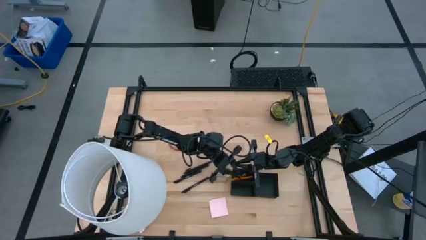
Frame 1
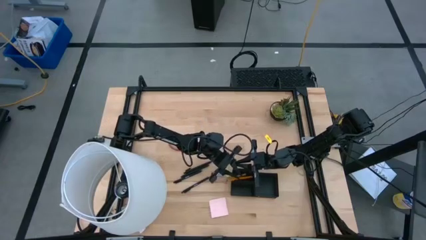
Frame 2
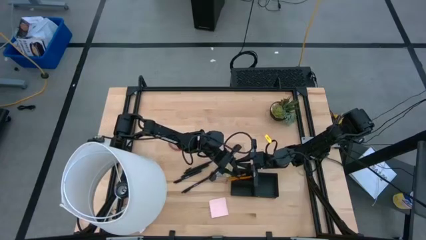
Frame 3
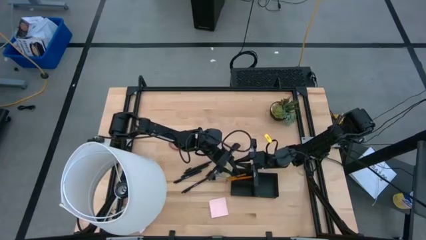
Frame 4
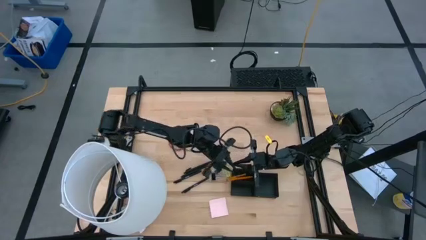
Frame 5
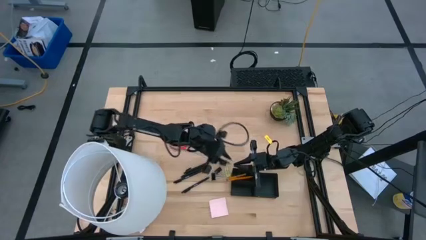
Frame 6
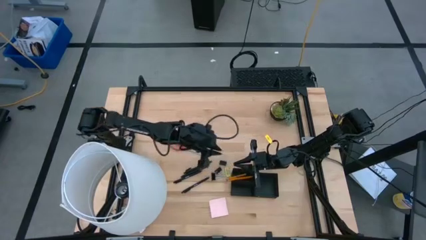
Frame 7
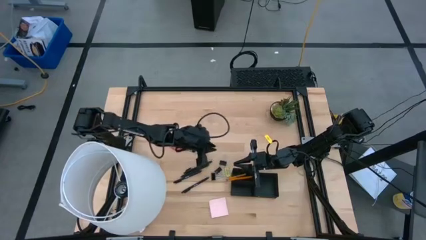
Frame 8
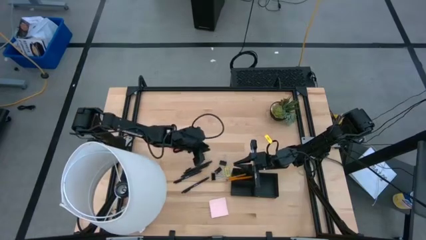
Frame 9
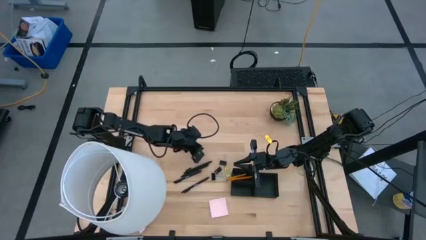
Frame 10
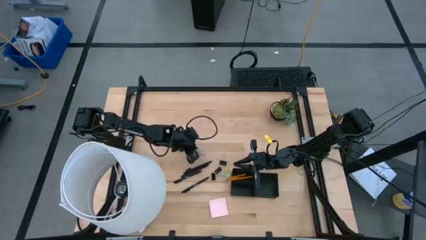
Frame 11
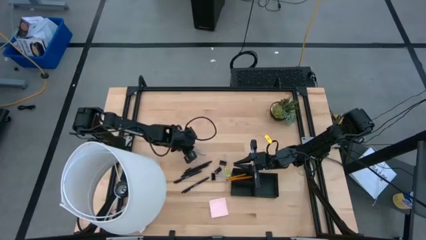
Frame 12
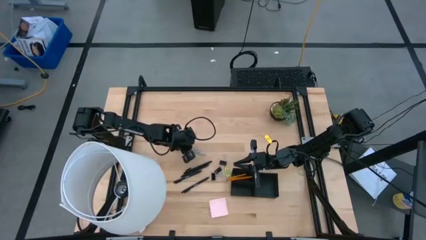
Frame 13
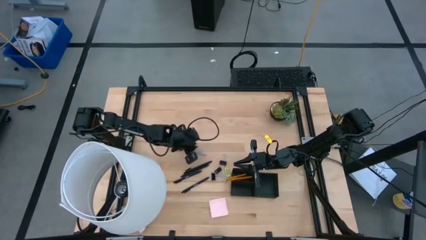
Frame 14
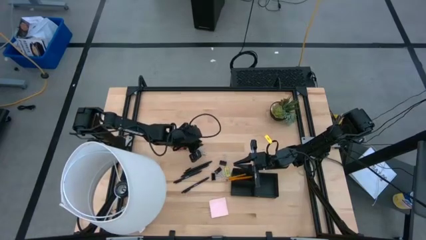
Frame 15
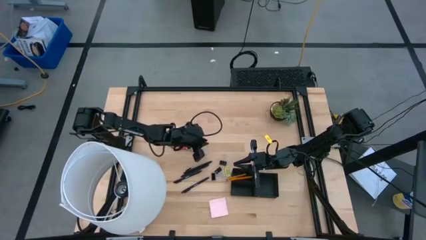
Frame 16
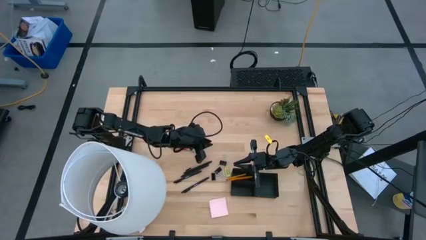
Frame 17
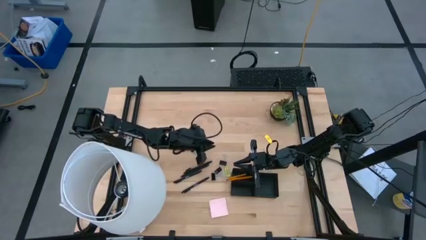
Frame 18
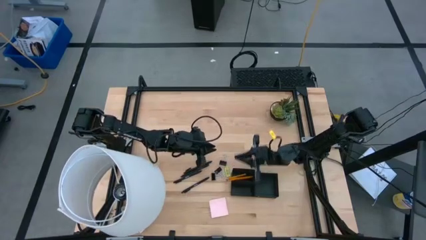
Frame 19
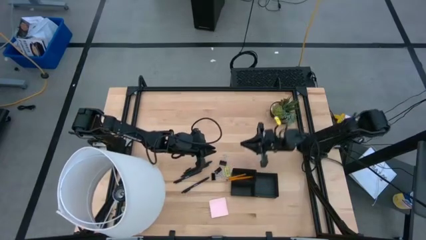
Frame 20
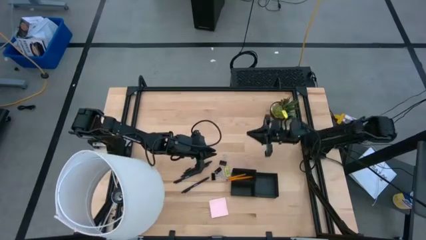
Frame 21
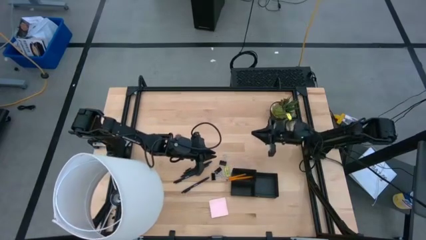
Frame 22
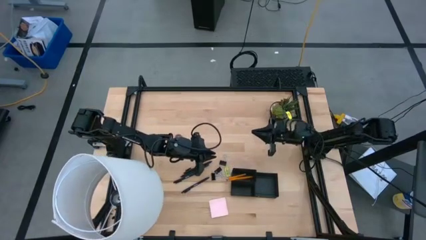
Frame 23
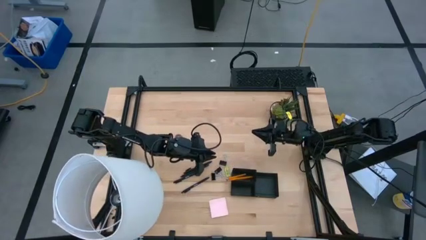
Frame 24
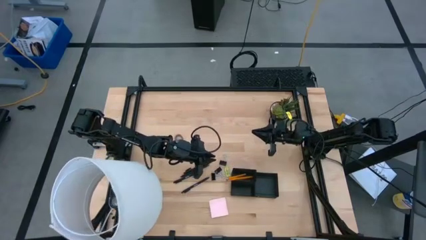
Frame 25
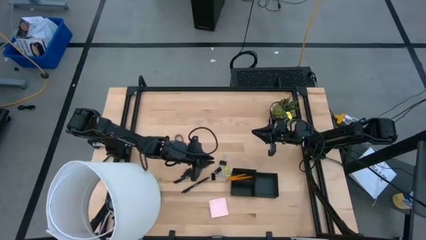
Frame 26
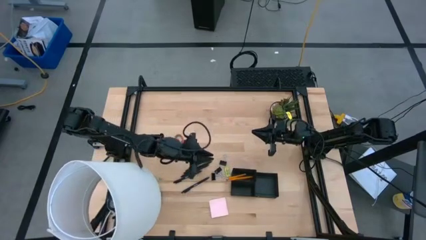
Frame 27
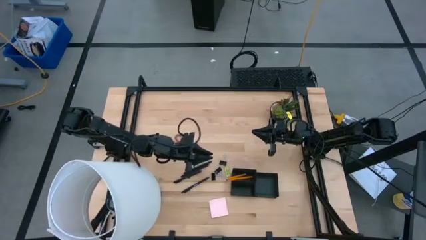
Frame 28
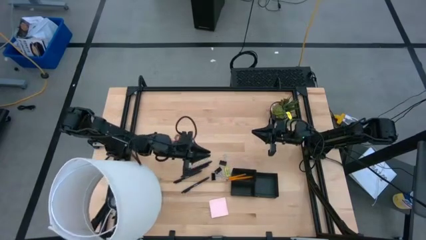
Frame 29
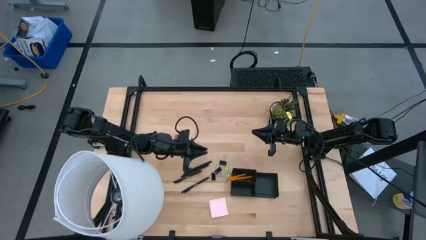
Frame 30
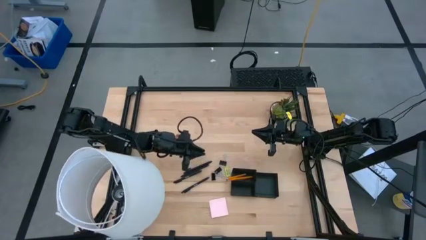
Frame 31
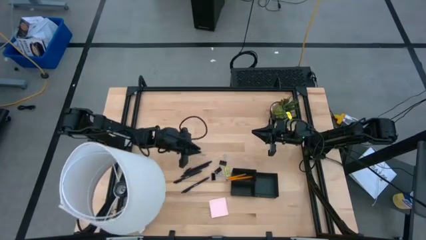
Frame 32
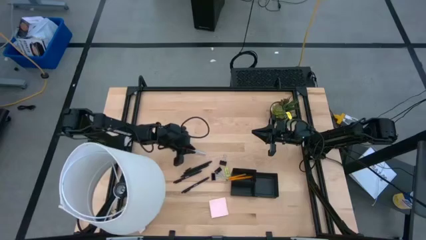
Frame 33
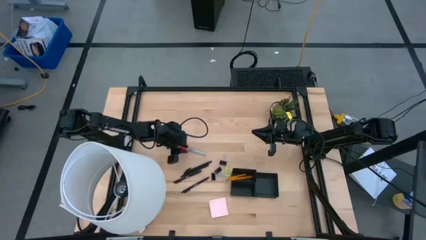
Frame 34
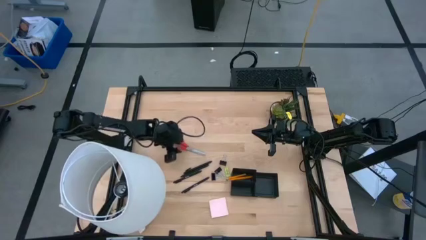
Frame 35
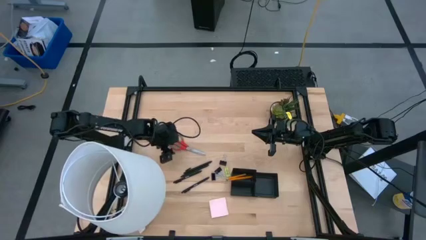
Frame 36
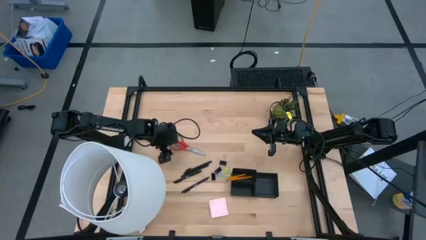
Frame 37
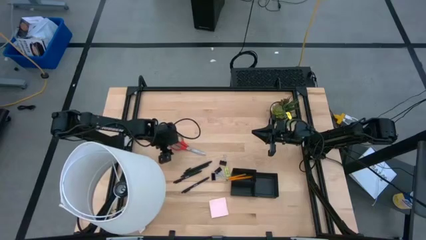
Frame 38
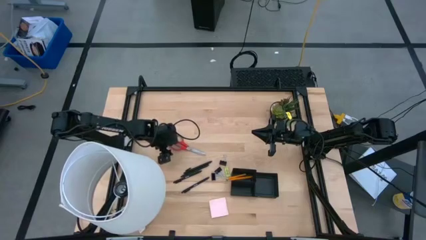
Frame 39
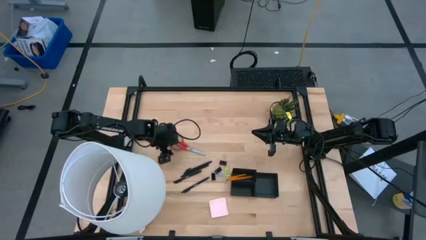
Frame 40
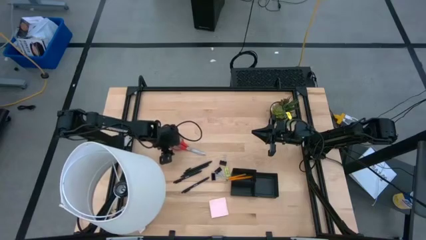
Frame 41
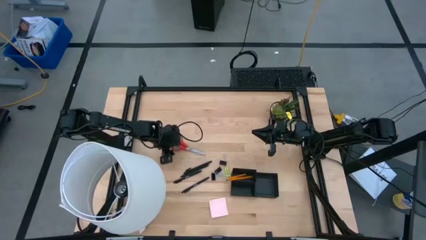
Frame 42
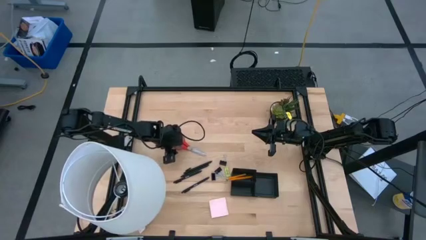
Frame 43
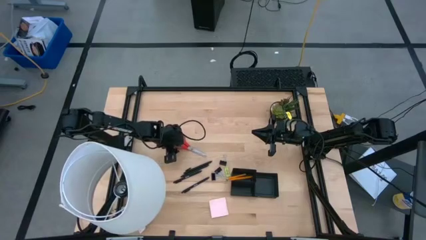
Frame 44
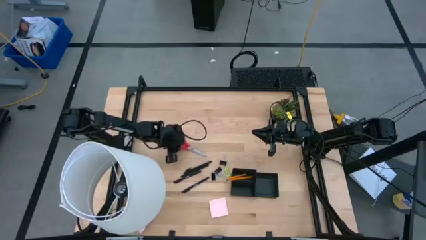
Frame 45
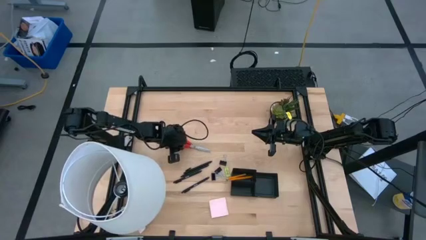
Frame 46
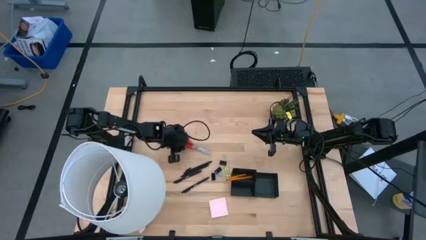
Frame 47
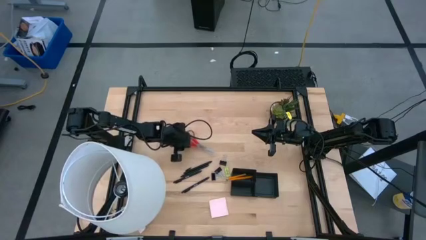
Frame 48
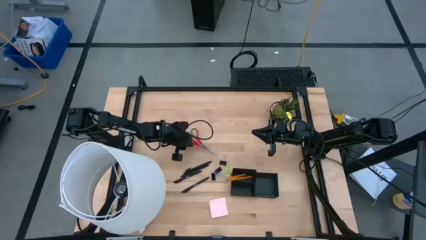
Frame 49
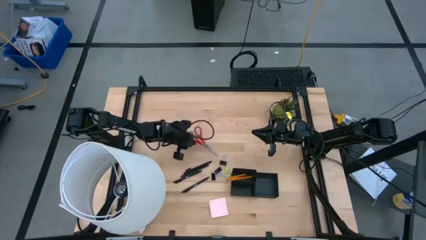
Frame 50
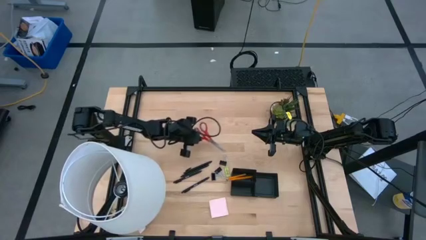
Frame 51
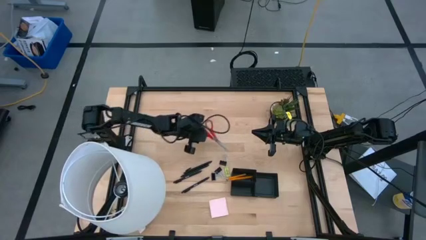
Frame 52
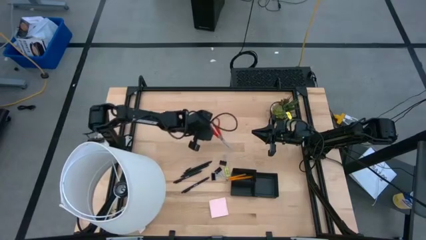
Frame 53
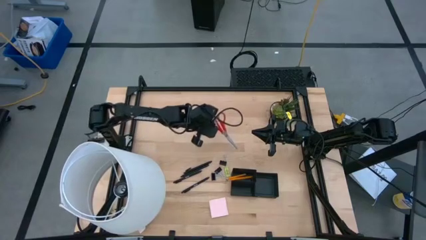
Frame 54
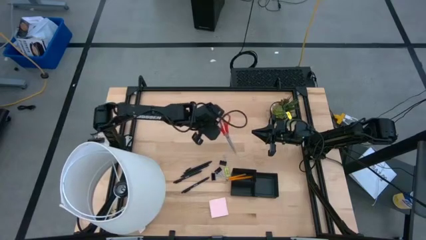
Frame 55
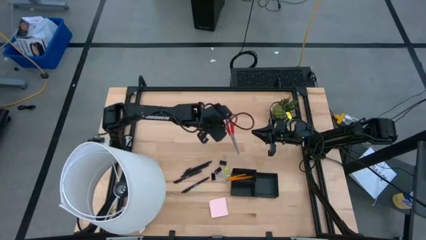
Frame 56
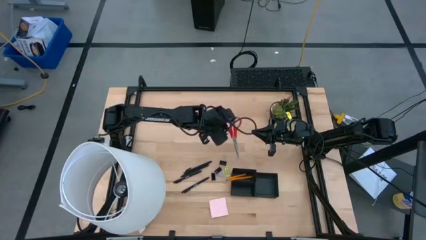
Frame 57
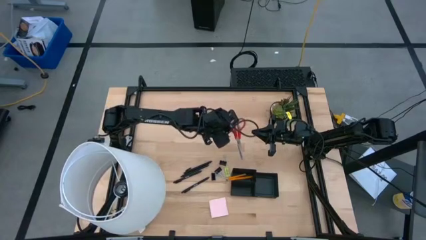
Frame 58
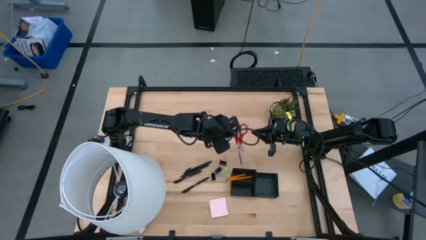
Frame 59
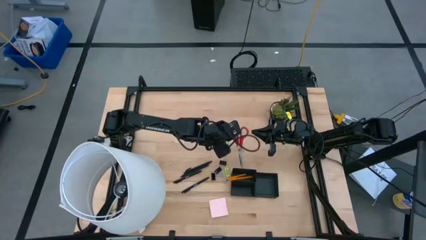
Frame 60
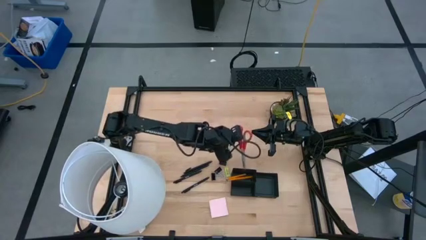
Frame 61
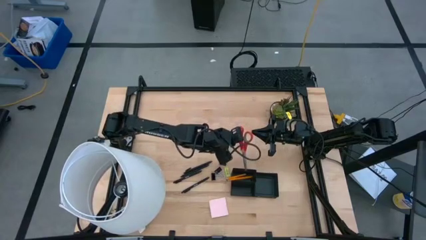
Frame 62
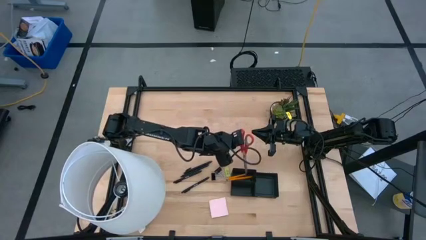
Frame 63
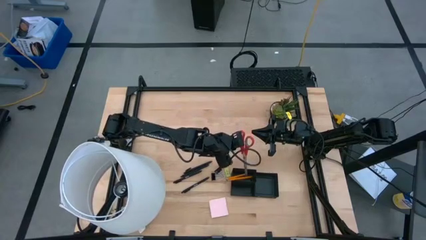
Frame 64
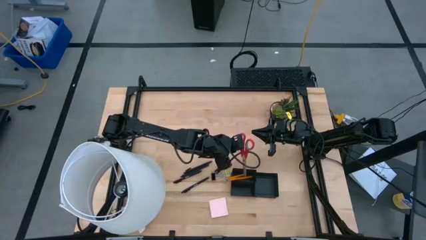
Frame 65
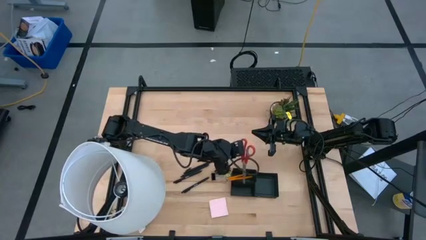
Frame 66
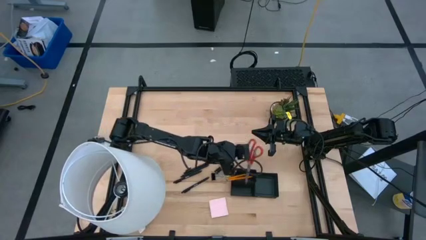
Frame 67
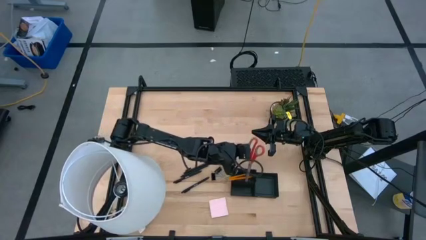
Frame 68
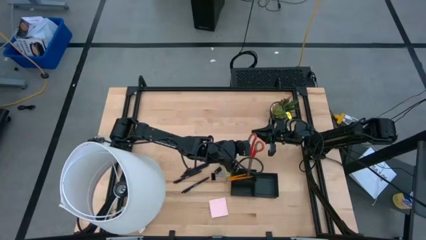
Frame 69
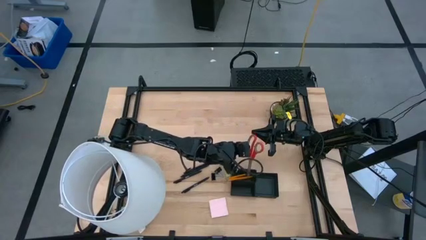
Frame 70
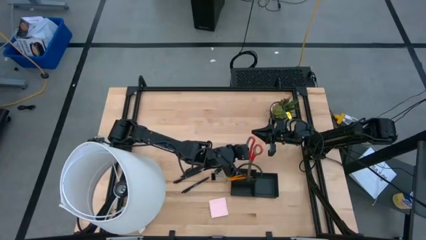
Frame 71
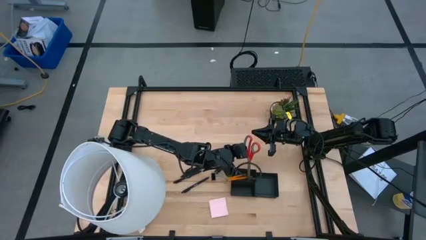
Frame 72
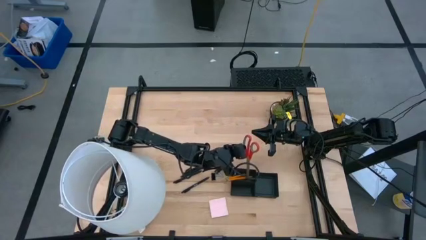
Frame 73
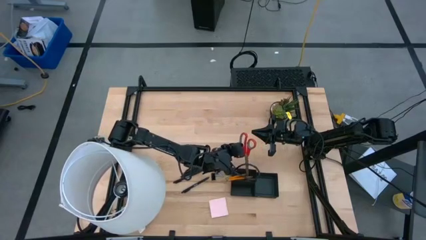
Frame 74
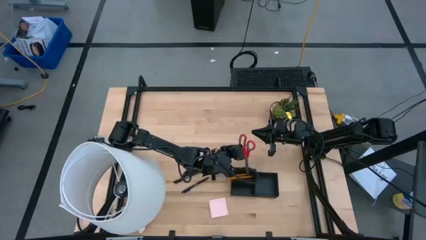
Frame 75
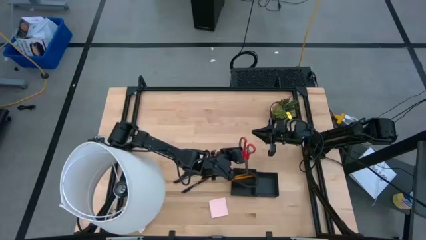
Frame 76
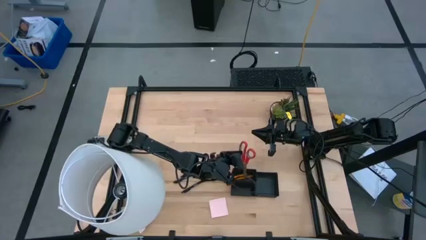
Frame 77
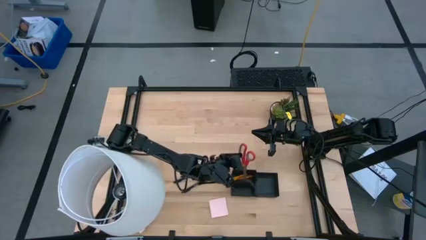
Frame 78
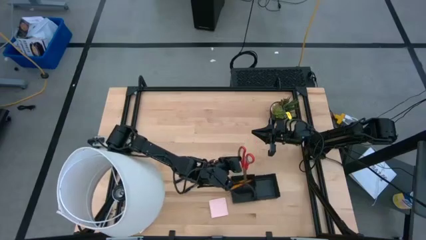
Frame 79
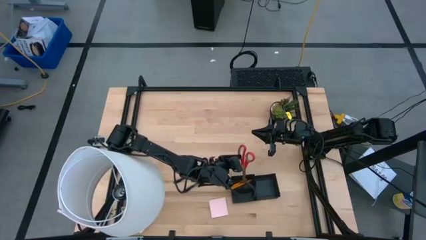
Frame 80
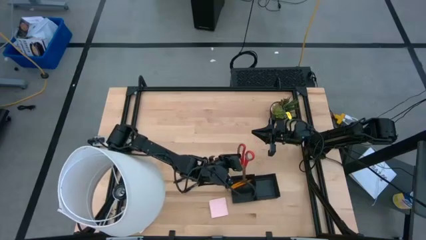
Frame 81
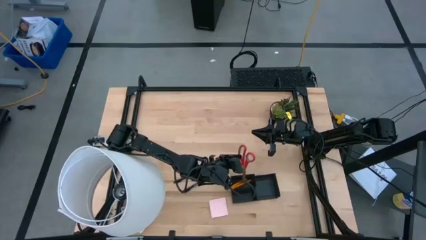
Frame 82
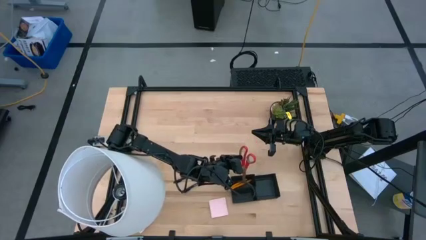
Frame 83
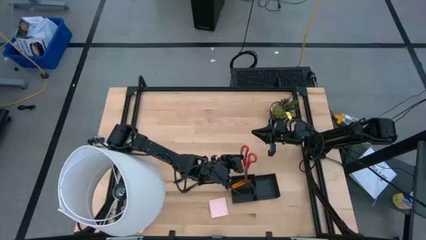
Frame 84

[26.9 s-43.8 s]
Task: Pick and place office supplies into organizer
Put the red scissors into the black desk organizer
